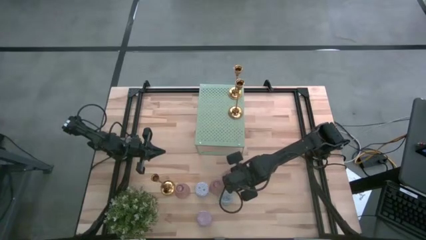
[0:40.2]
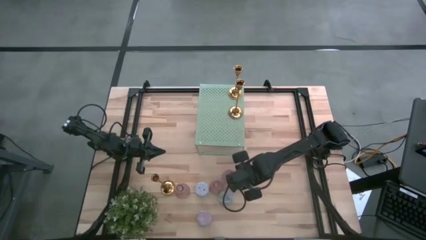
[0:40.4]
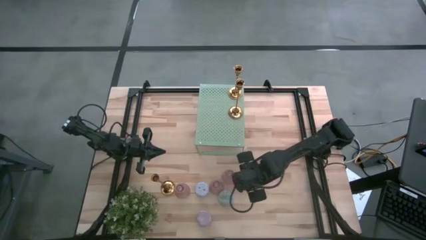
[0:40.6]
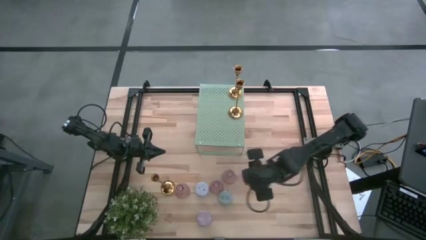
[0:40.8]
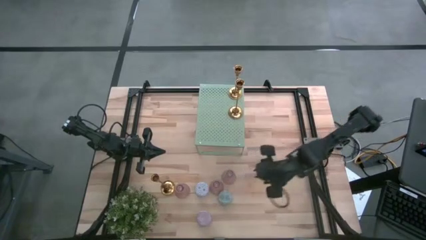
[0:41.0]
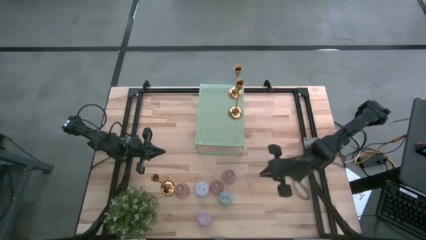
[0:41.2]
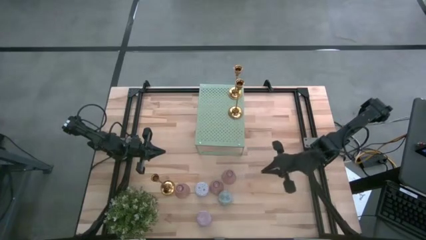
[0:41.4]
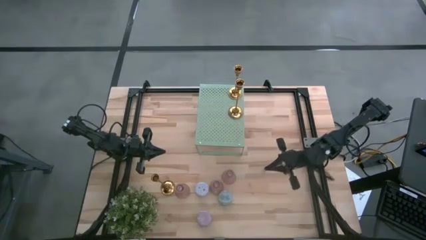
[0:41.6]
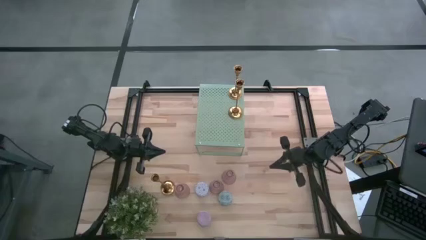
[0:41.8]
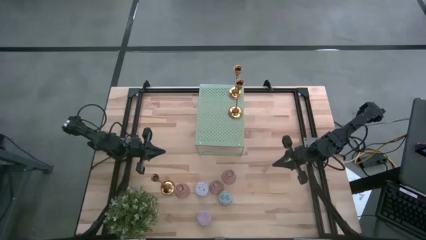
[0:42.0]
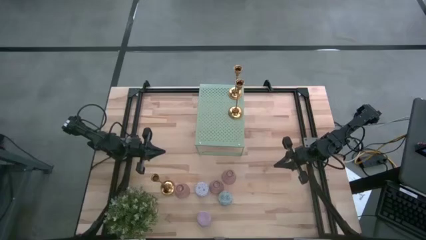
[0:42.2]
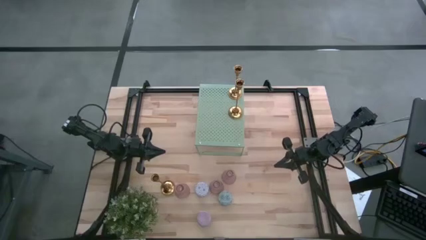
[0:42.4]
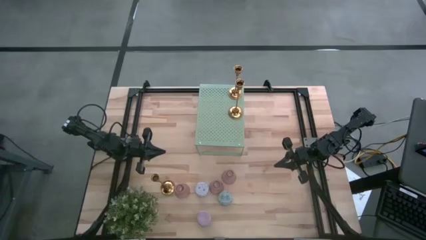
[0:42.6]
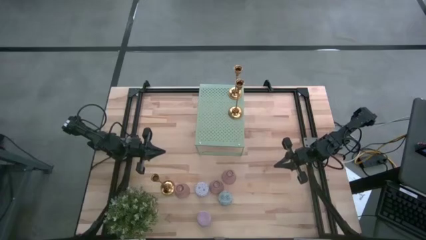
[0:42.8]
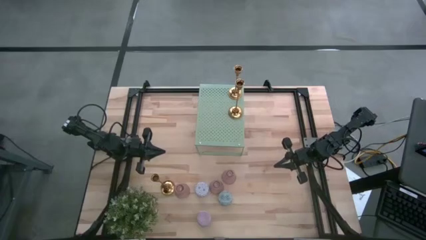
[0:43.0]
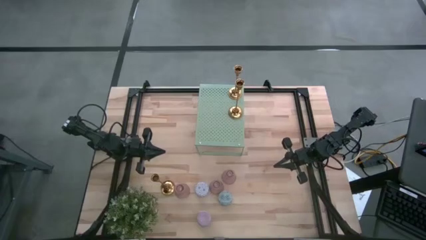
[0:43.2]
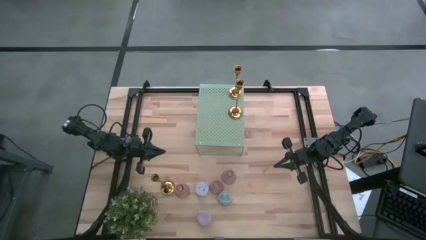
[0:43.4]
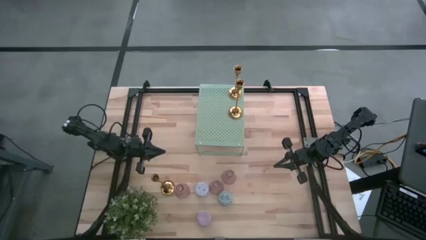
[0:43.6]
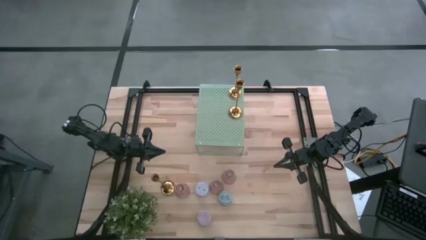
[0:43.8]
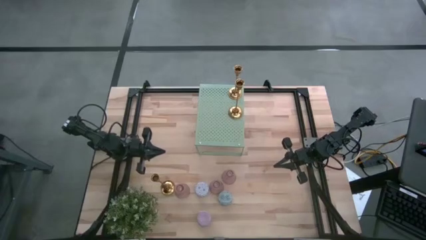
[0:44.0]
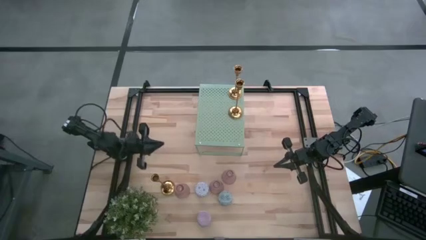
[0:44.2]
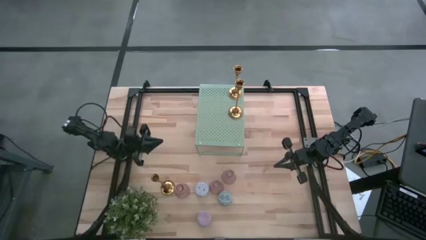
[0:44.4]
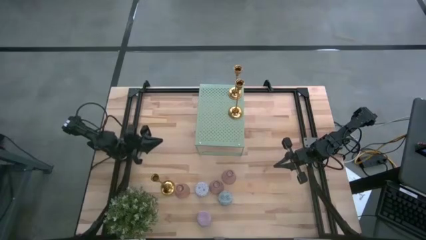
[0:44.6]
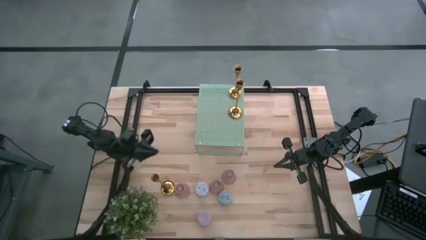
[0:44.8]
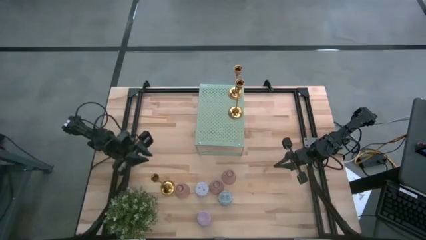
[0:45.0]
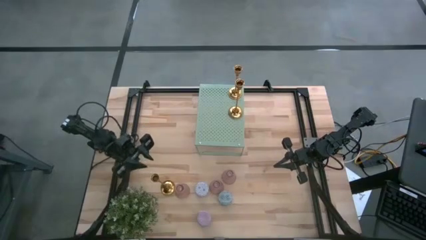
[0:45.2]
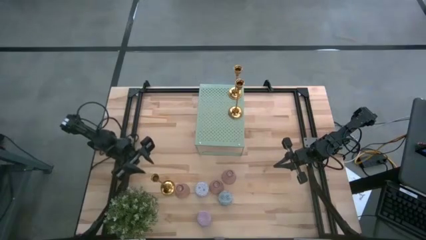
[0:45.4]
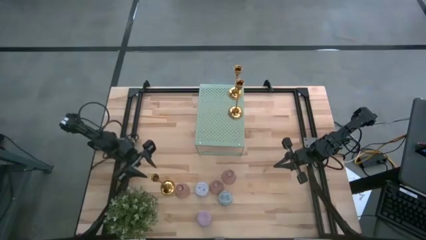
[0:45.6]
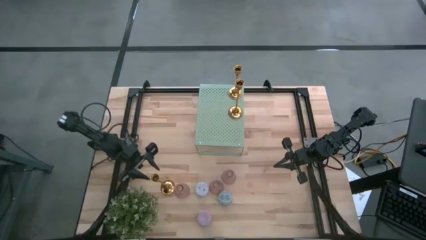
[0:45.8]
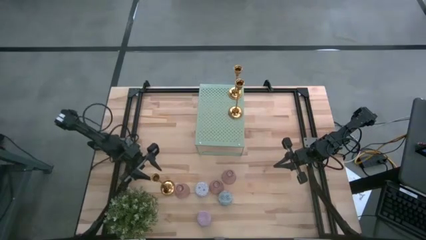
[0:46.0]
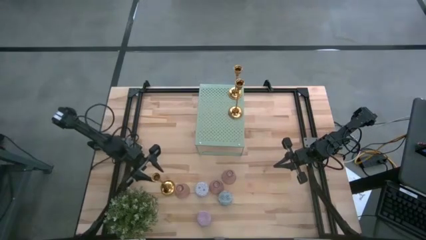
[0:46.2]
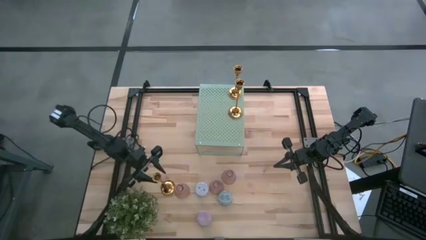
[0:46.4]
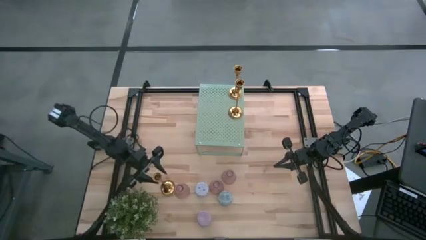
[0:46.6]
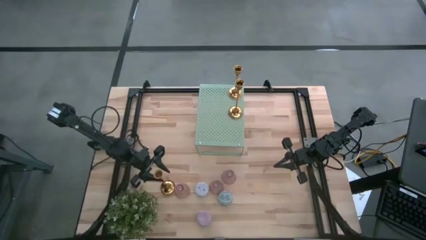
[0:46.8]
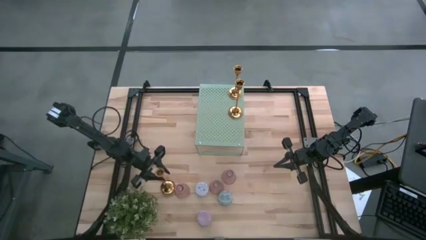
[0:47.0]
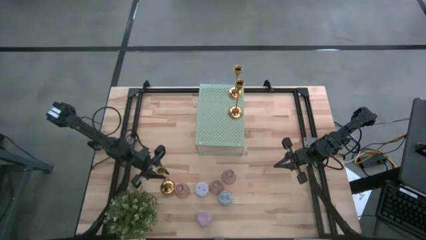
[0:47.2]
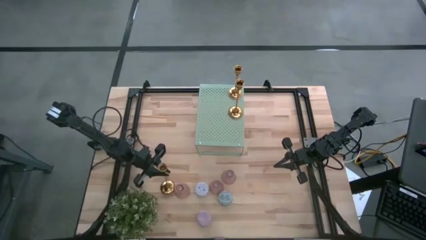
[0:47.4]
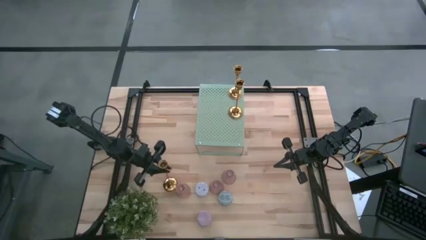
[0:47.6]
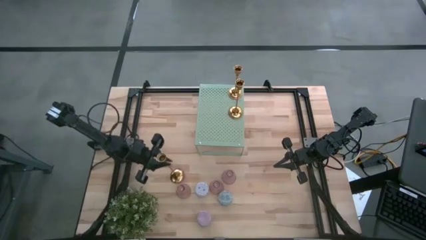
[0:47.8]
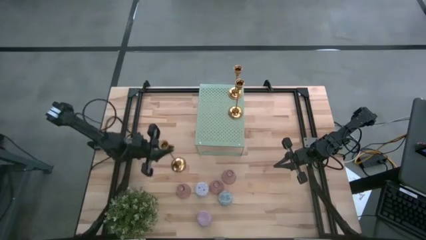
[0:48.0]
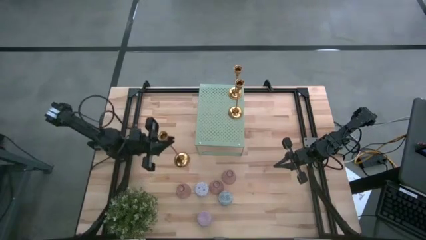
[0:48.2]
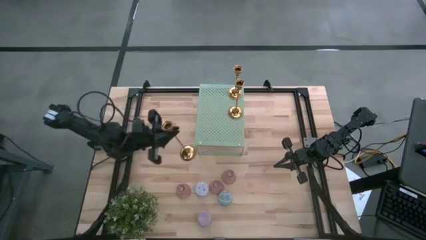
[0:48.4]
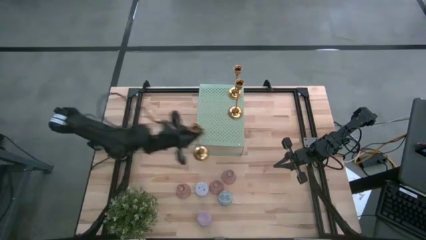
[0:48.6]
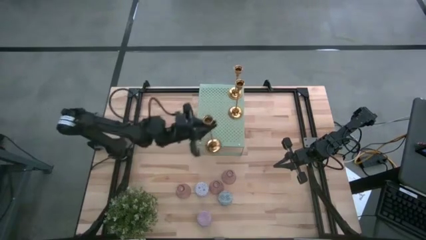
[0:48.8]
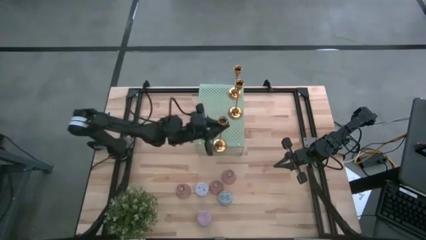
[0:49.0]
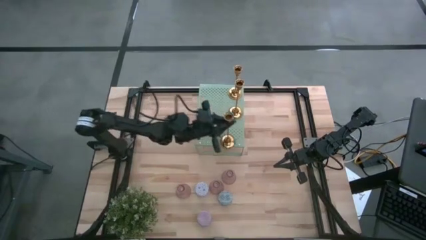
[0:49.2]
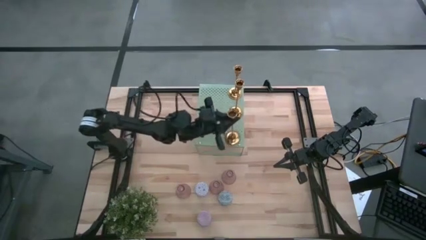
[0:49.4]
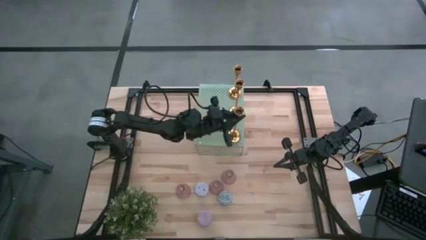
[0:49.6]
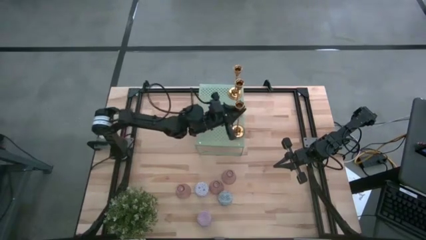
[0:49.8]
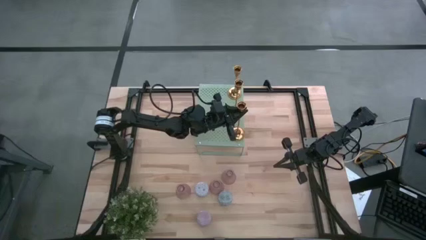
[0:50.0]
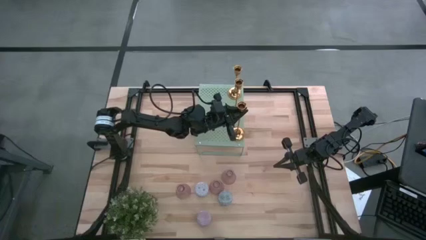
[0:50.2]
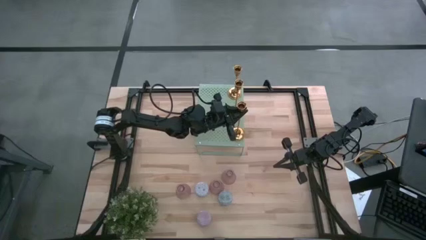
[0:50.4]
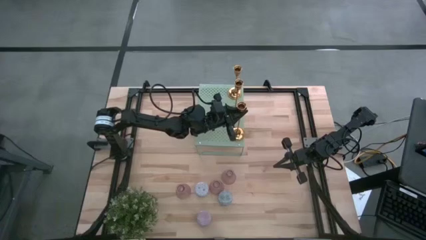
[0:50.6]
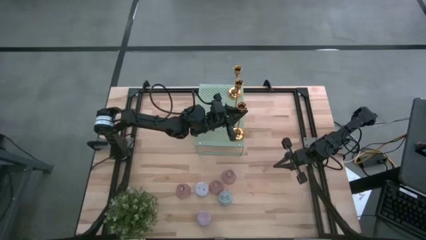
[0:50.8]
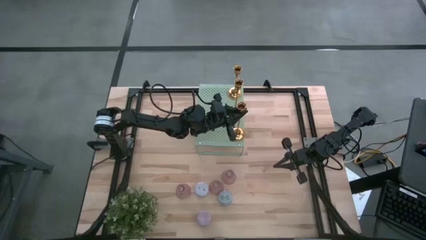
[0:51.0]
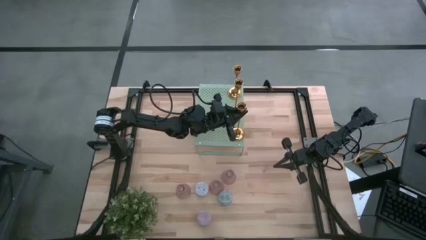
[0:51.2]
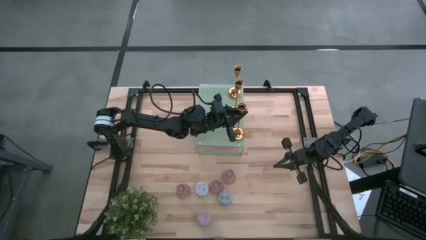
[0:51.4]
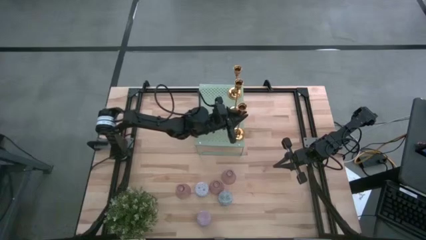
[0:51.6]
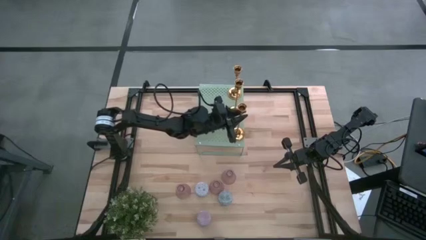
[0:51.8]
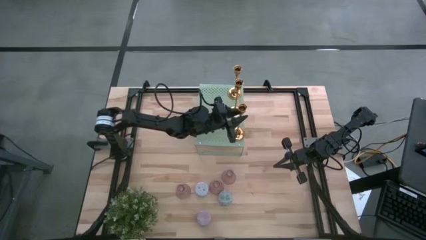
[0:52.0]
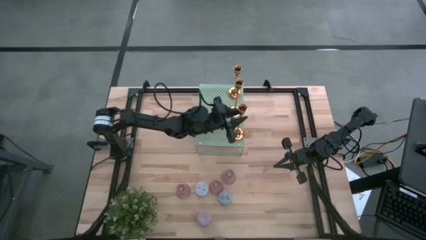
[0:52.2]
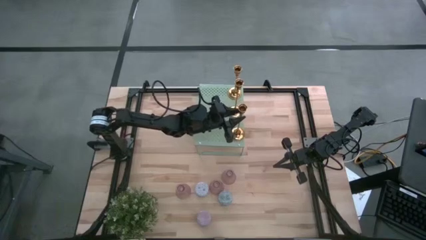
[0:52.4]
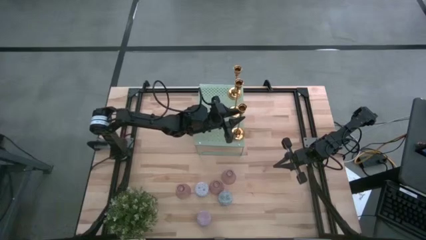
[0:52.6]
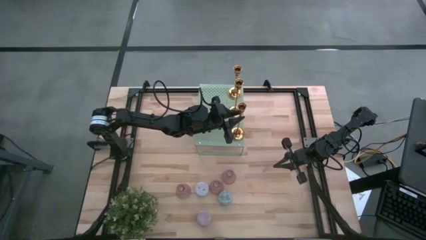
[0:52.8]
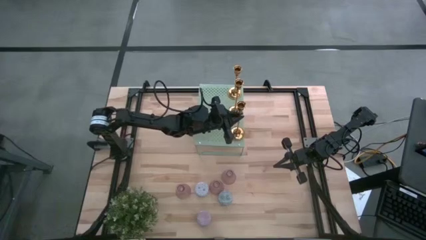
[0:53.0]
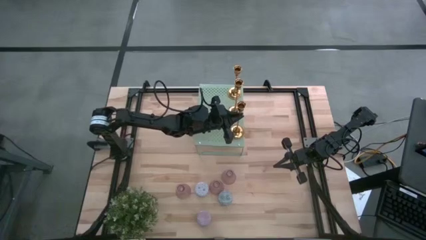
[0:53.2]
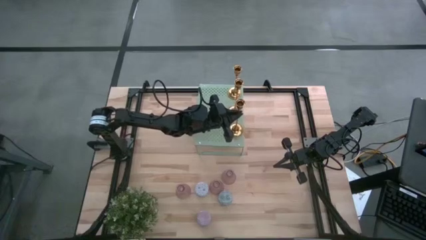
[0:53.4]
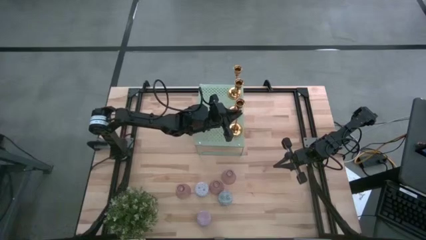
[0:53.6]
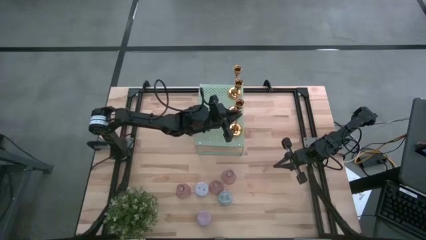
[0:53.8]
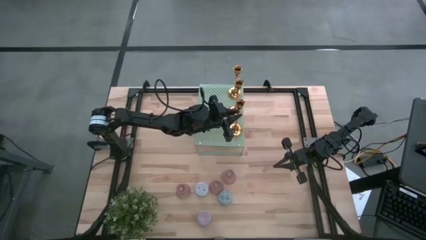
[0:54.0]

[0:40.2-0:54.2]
Task: Pick & Place candle stick holders
Put the gold candle holder on the shelf aligned with other gold candle holders
